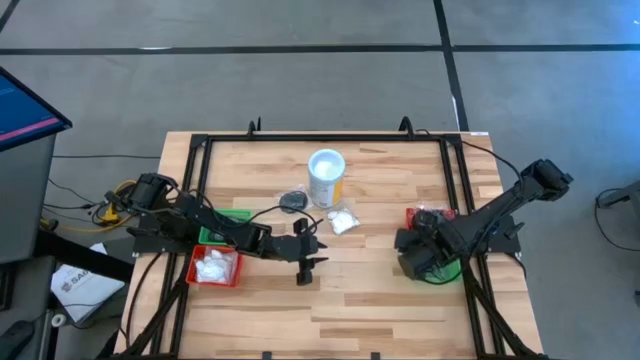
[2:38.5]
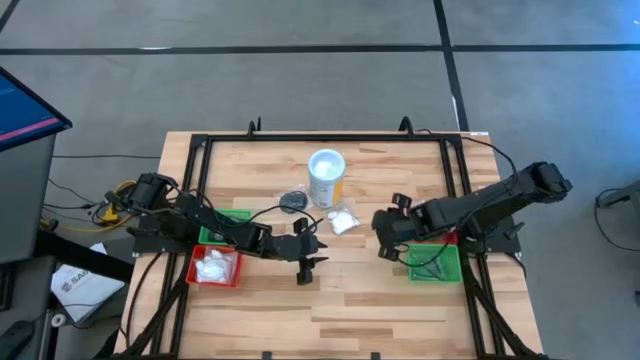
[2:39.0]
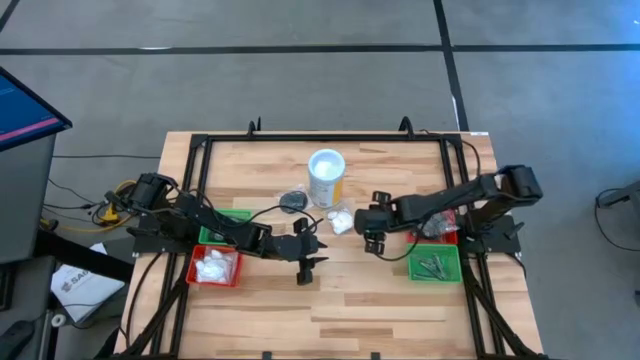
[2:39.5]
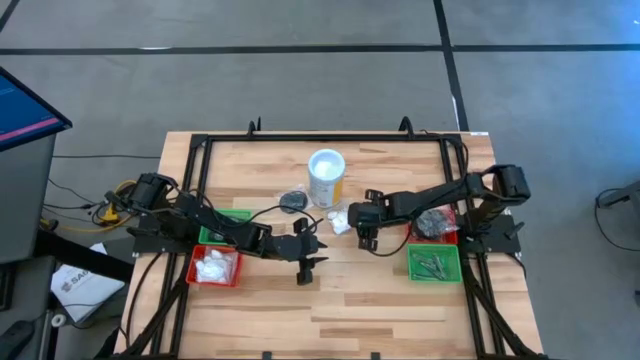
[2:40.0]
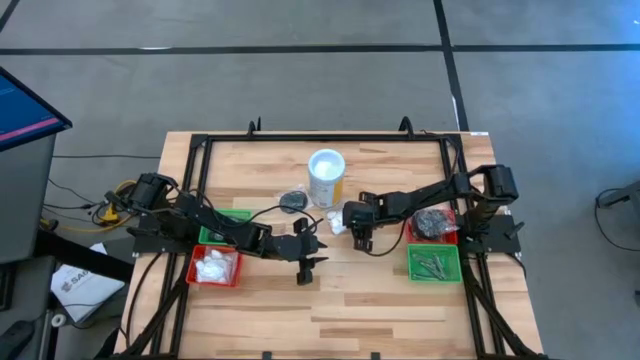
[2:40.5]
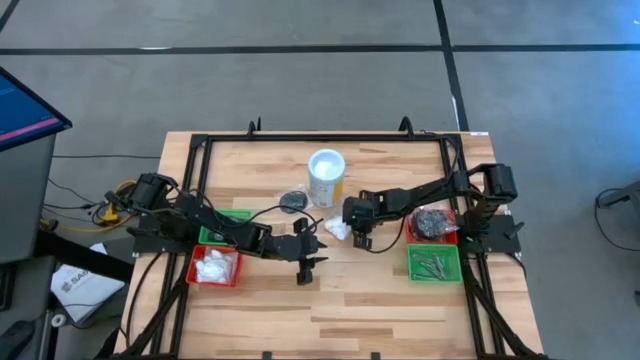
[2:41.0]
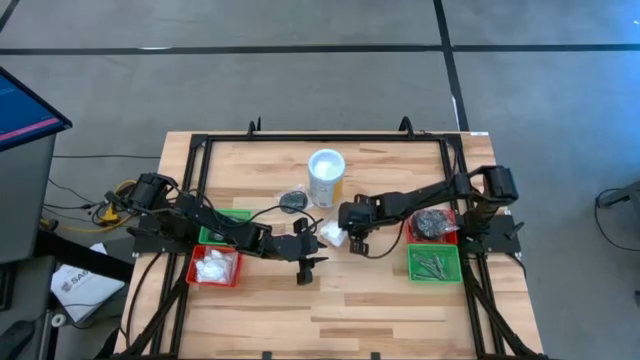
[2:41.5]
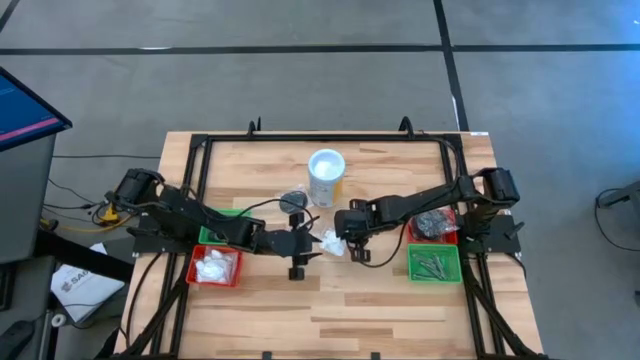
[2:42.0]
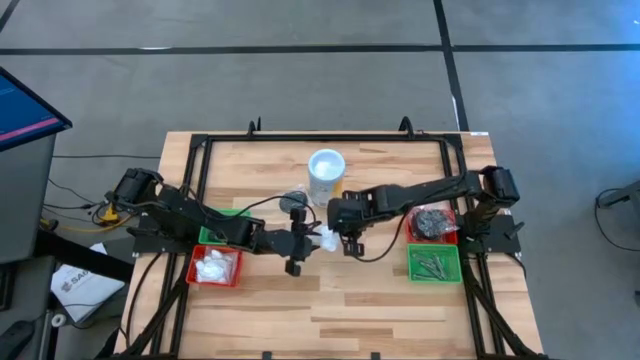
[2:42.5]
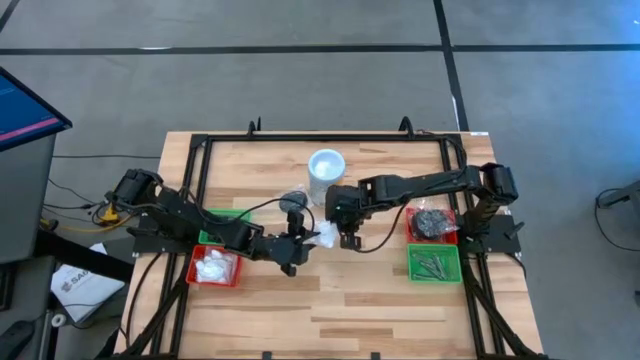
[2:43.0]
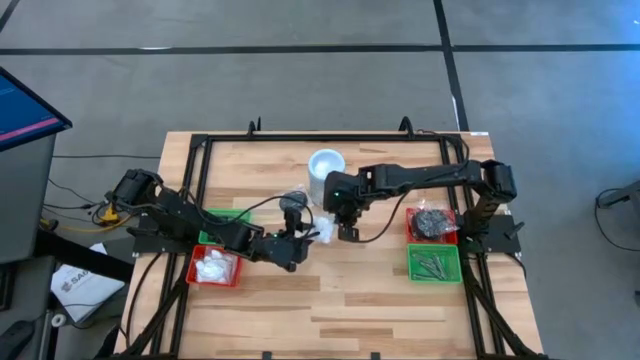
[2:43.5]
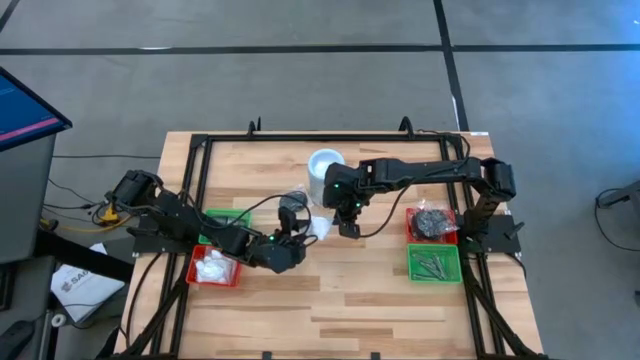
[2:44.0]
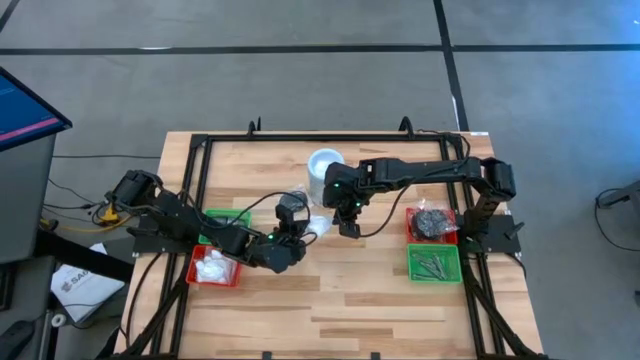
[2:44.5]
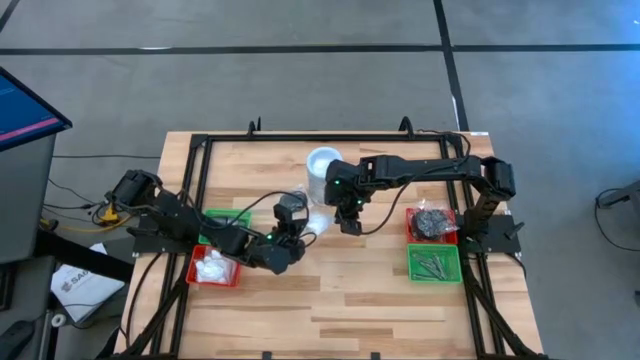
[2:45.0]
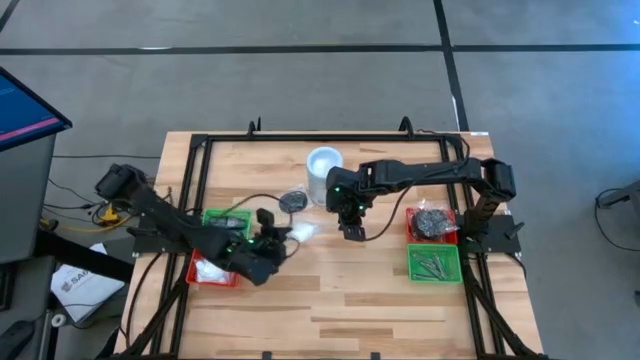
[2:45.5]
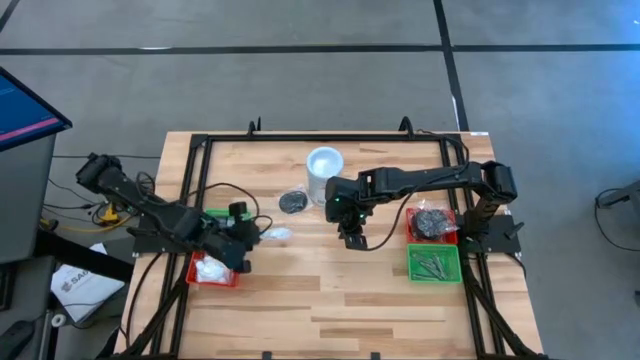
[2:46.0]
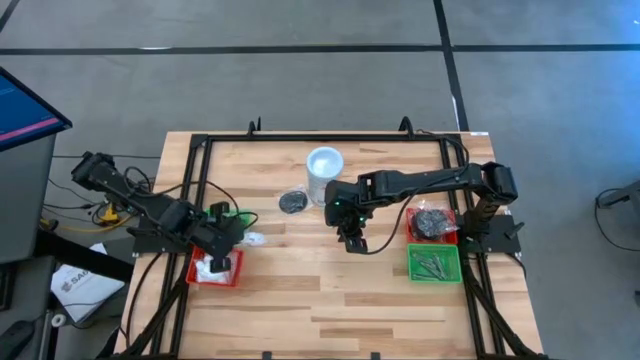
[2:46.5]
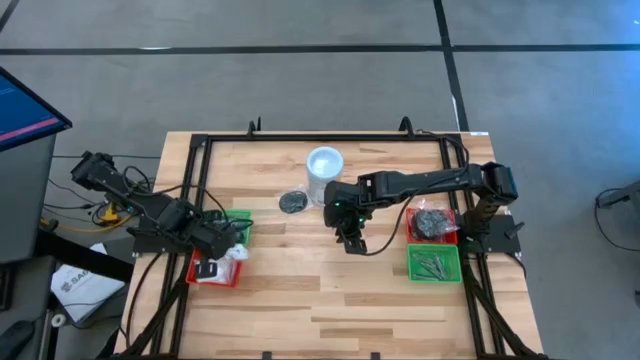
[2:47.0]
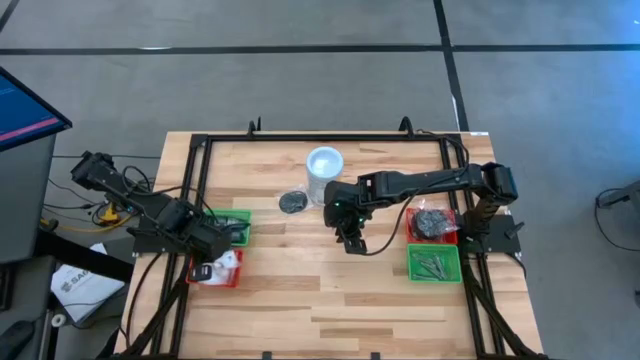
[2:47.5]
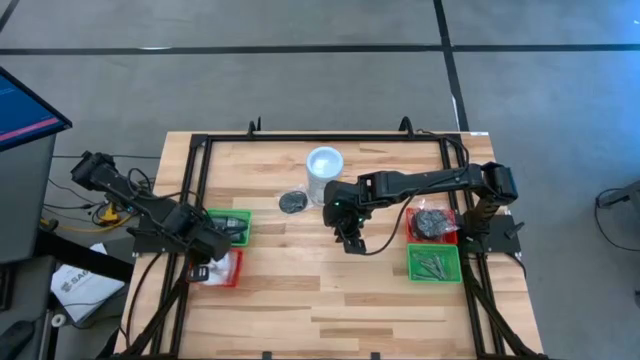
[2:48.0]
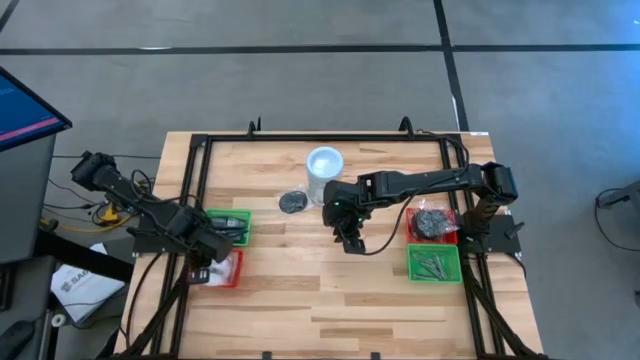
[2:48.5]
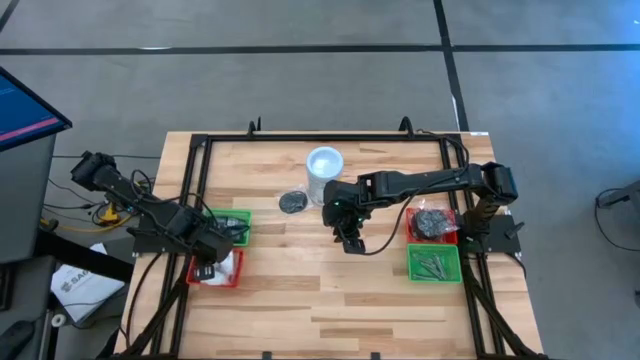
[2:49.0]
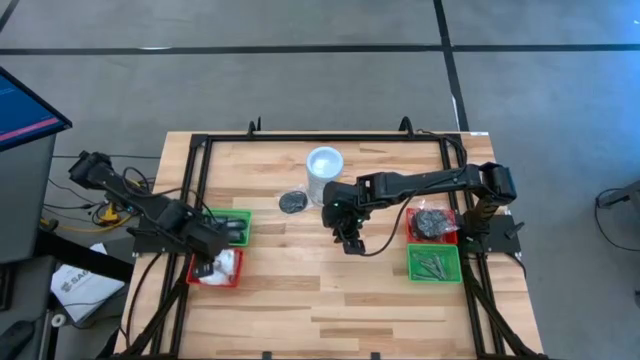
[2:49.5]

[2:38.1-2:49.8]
Task: Pick & Place Travel size toiletries
Put the cotton pack into the left red bin

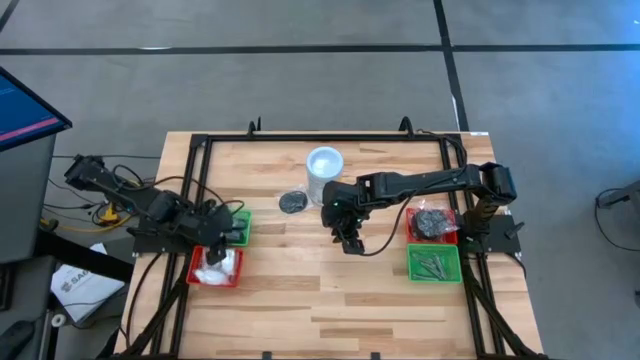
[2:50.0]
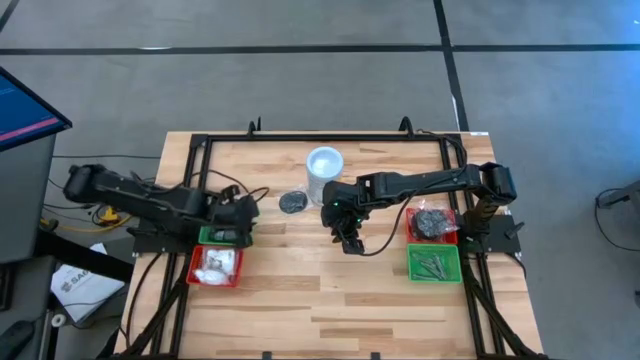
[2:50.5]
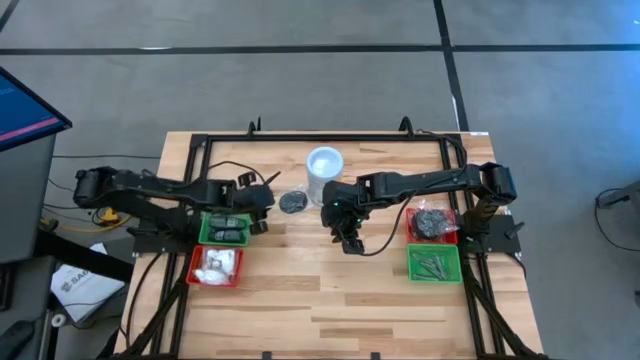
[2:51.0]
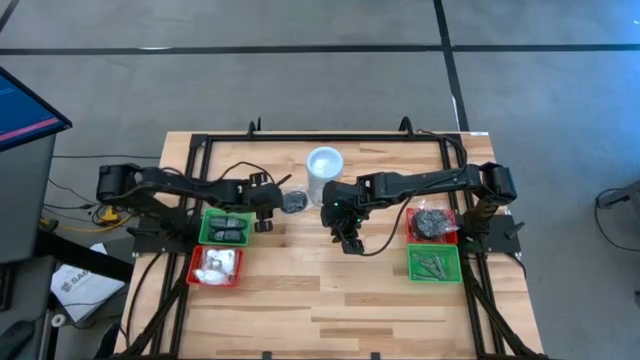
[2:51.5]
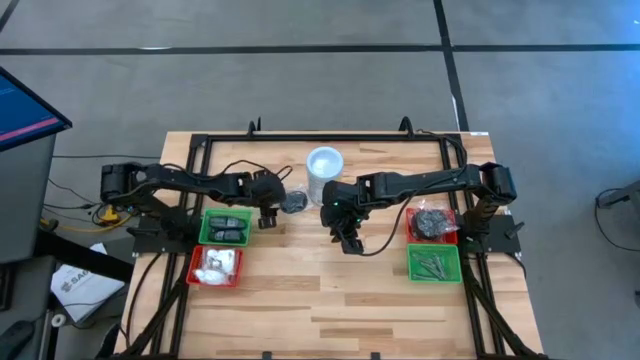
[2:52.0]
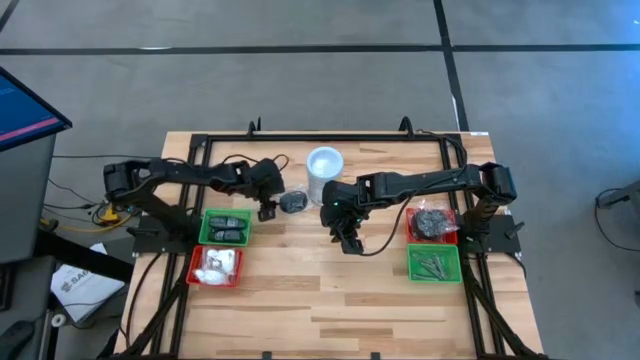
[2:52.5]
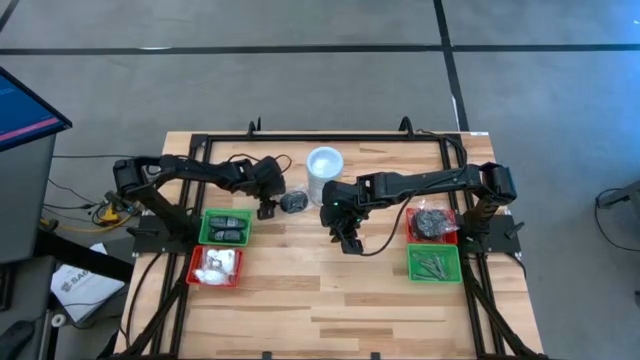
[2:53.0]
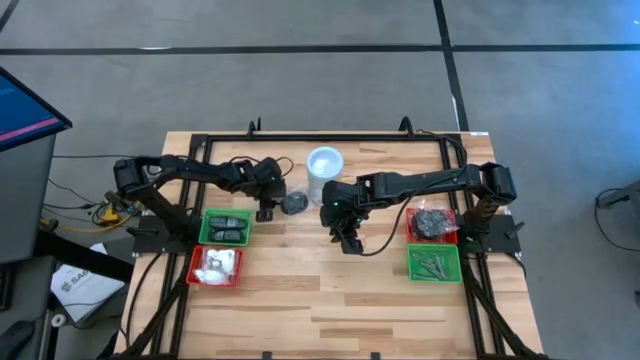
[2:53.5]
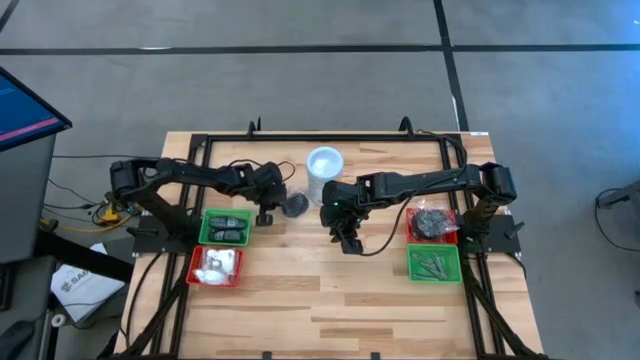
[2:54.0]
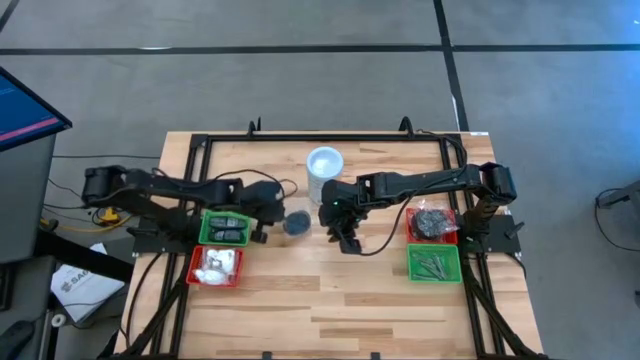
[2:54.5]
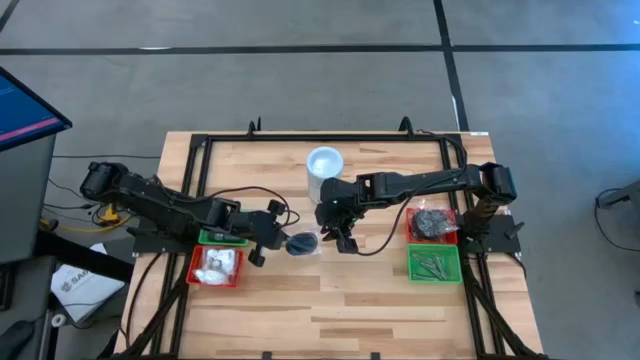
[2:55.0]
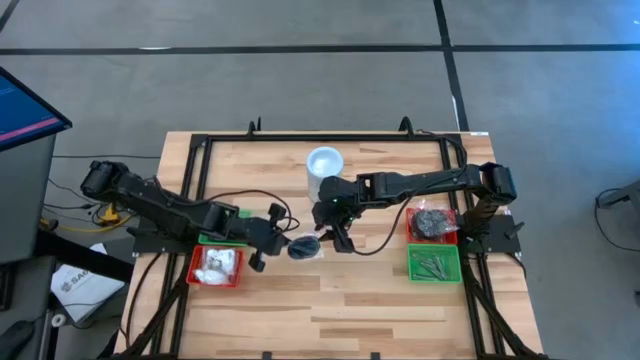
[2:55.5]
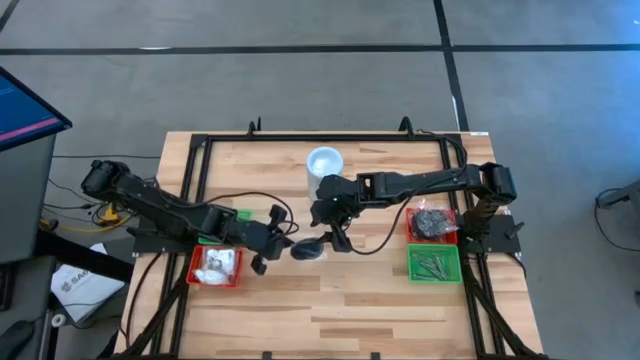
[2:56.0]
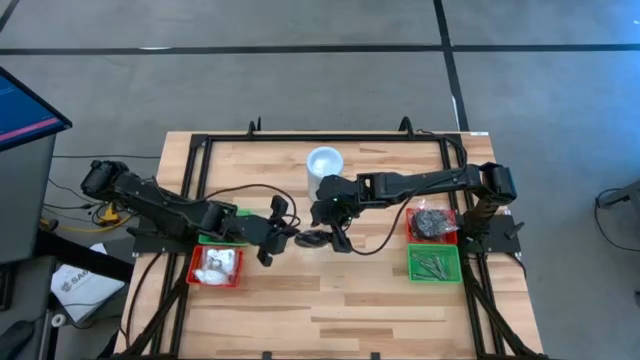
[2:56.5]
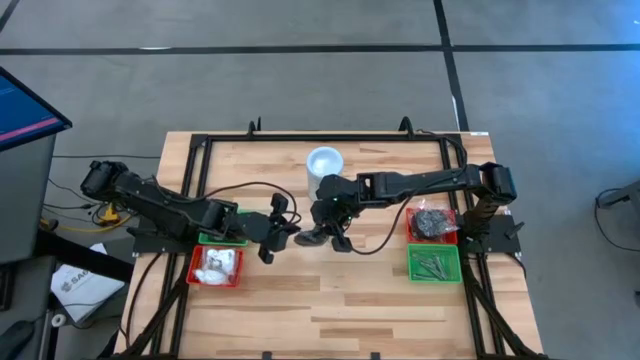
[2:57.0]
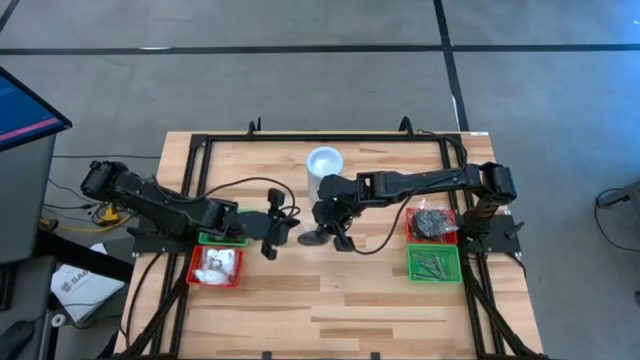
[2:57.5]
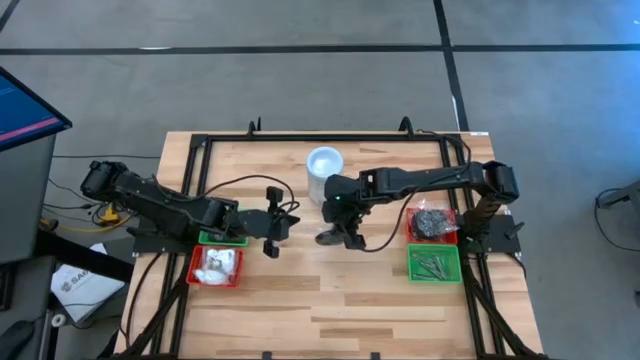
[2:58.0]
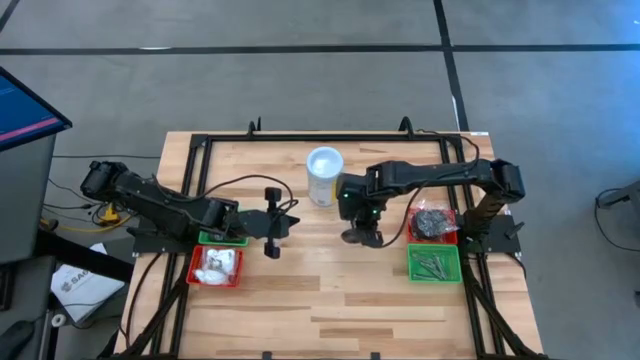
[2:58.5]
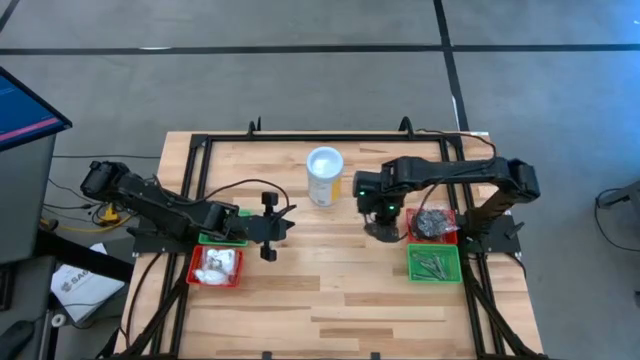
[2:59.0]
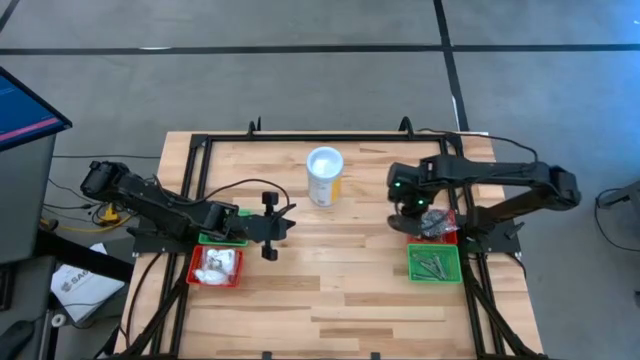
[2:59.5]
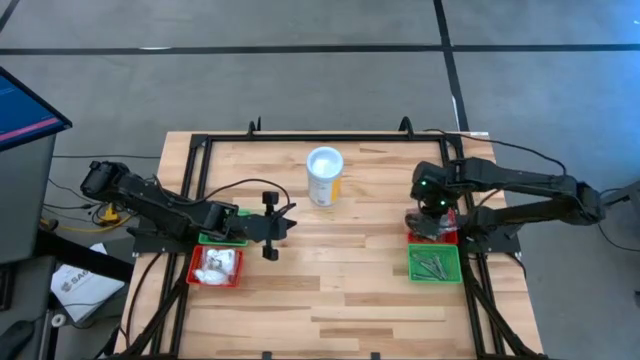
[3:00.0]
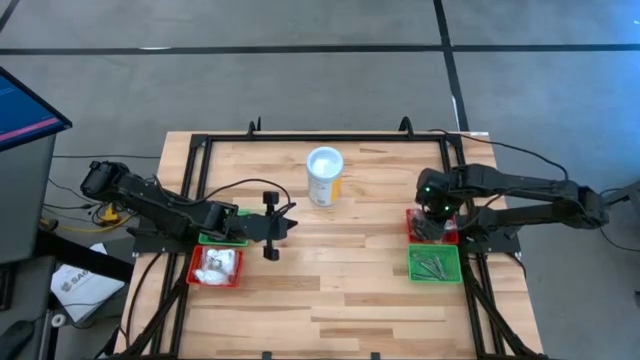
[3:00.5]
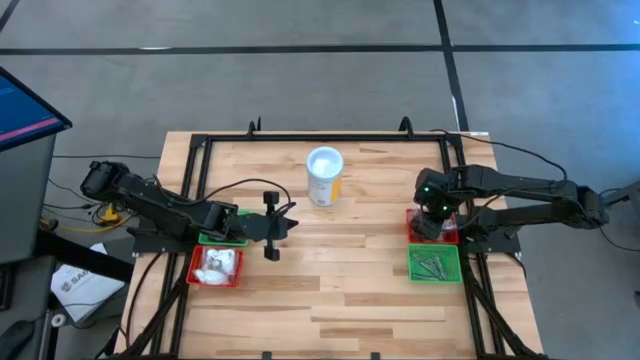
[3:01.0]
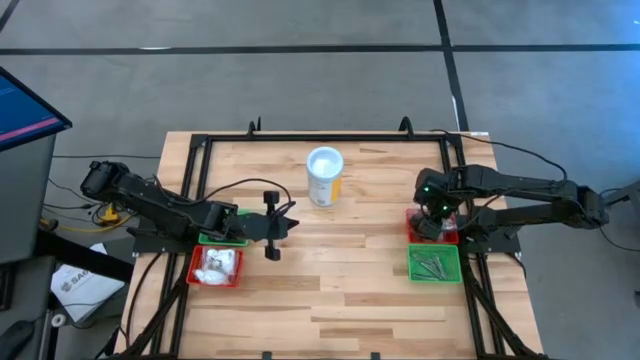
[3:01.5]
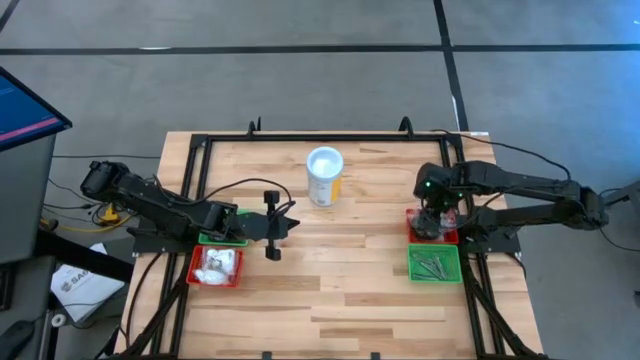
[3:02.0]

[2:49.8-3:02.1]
Put the hairbrush into the right red bin
